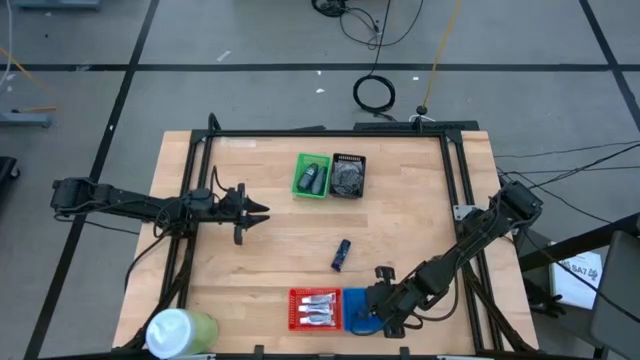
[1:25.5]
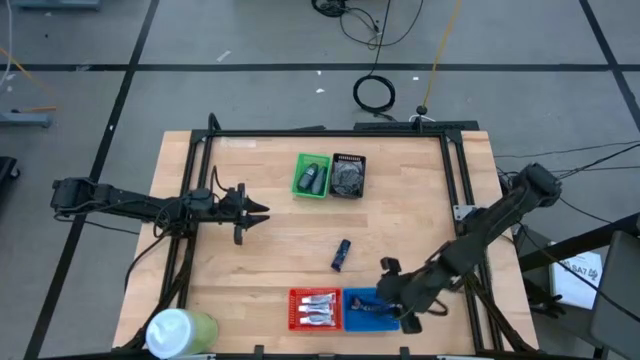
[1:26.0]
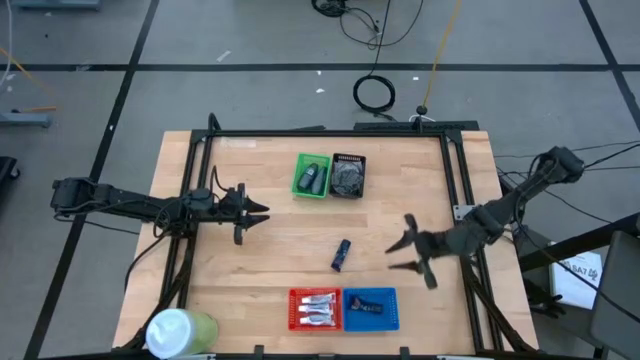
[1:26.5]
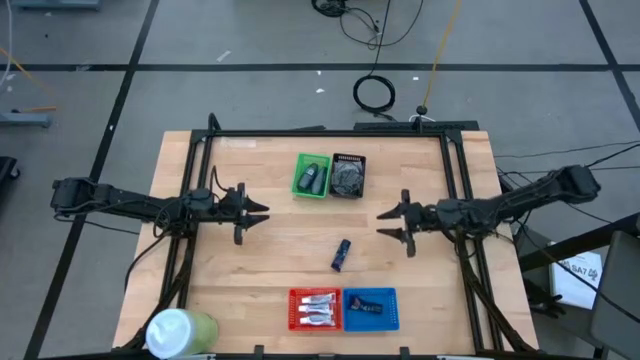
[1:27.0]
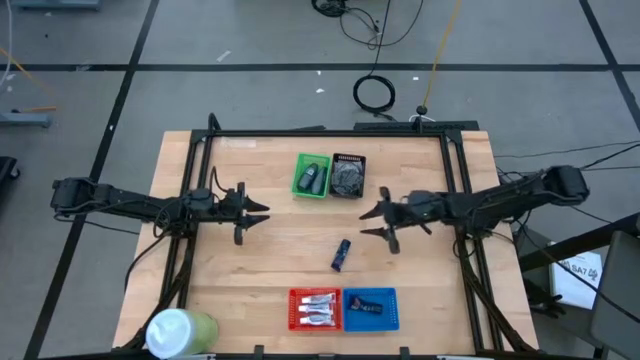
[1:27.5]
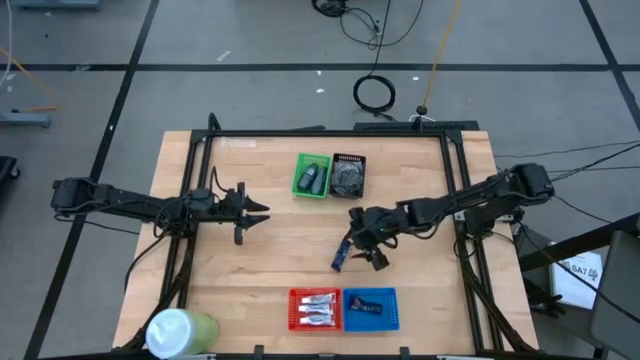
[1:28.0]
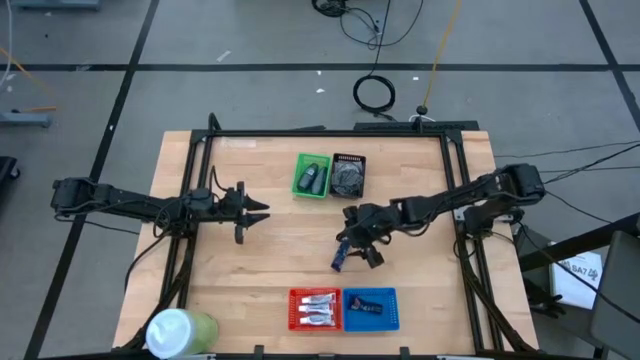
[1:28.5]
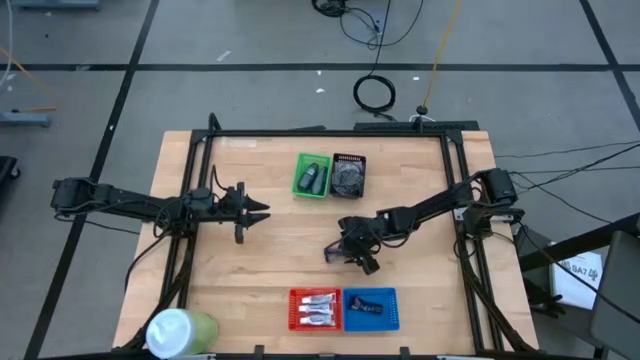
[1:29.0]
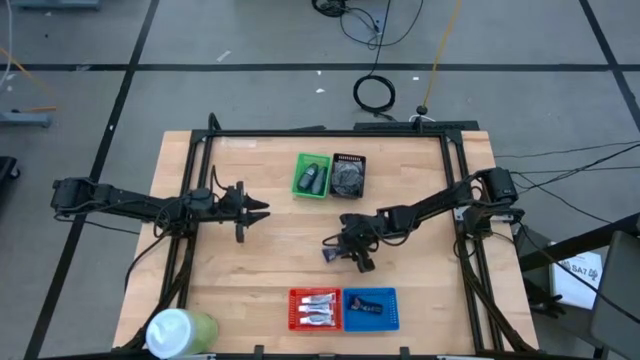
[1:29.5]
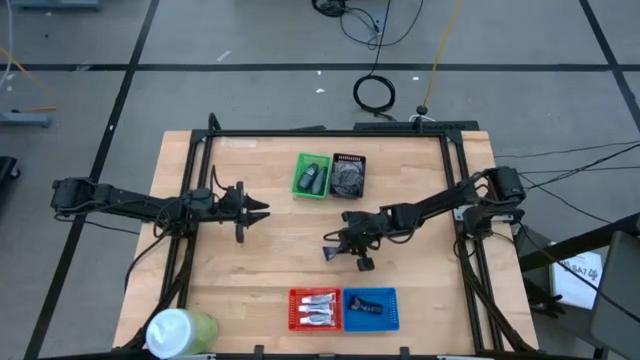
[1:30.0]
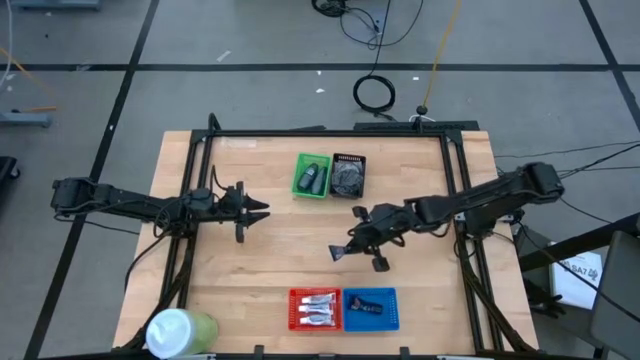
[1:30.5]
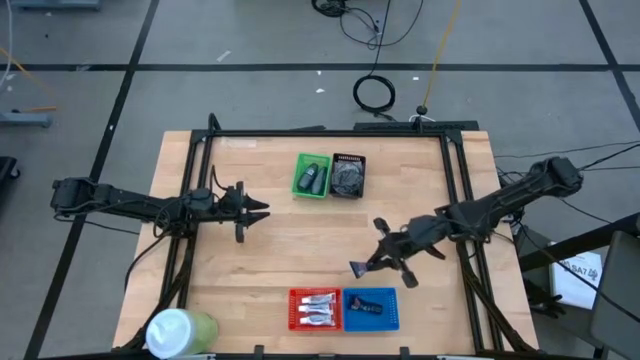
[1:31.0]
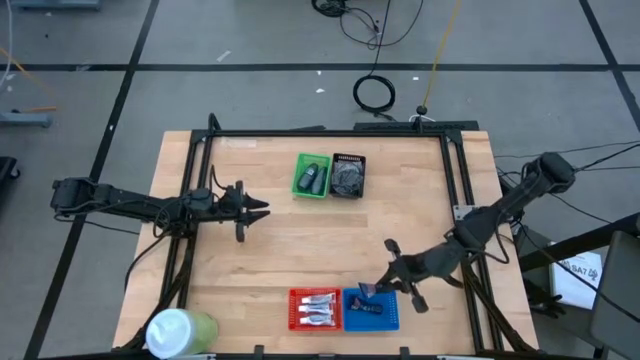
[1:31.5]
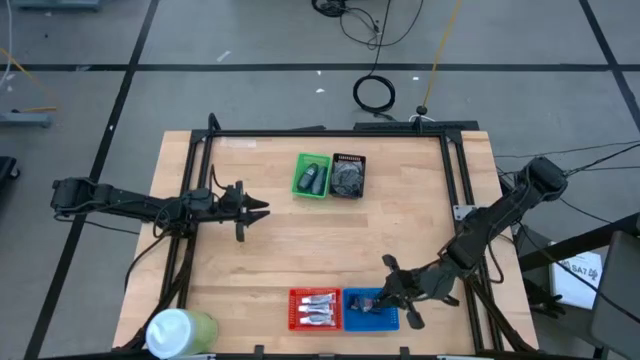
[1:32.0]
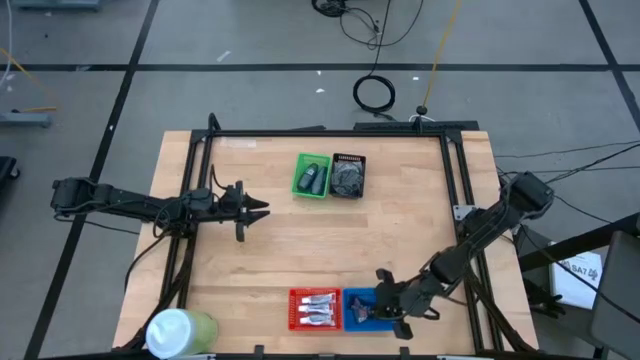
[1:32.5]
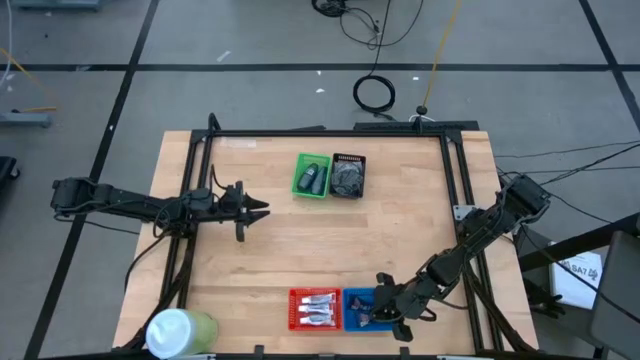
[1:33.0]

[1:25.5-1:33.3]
Task: Pick & Place Travel size toiletries
Put the shave cream into the blue bin

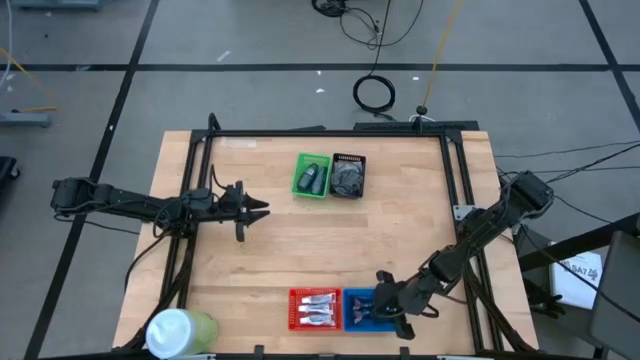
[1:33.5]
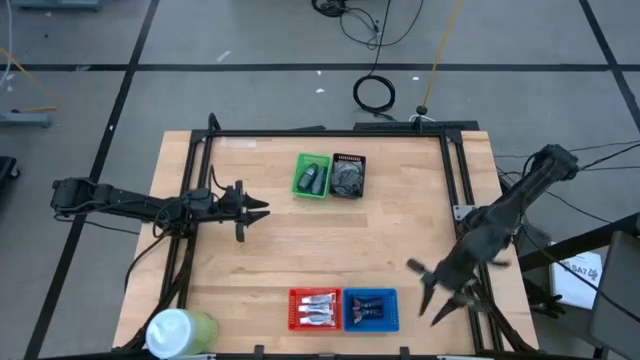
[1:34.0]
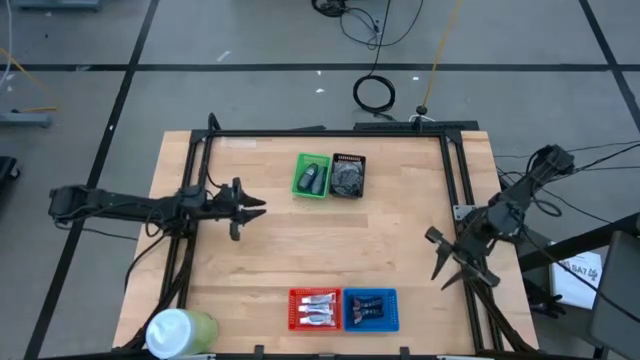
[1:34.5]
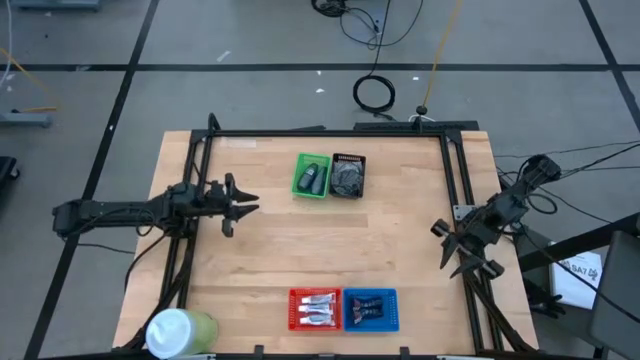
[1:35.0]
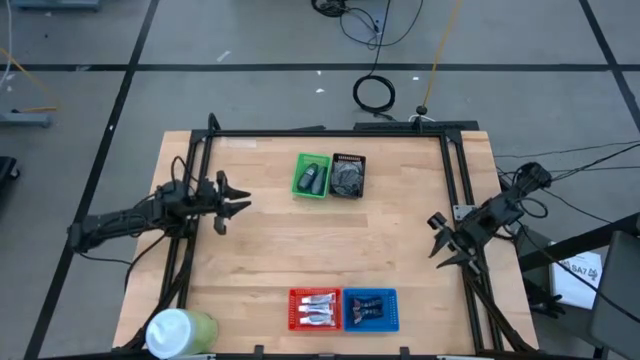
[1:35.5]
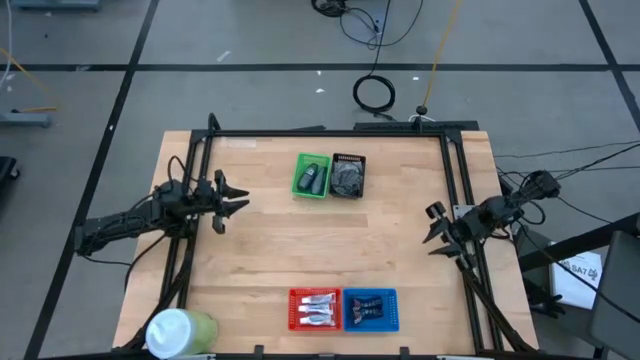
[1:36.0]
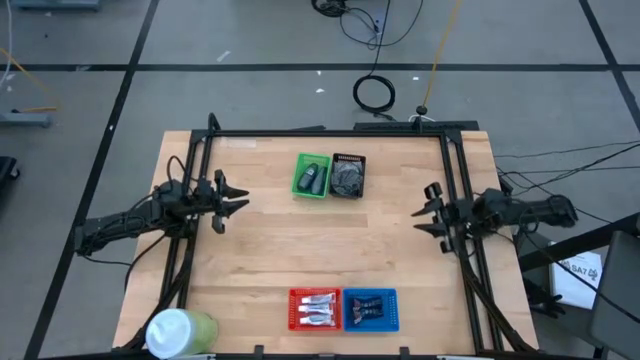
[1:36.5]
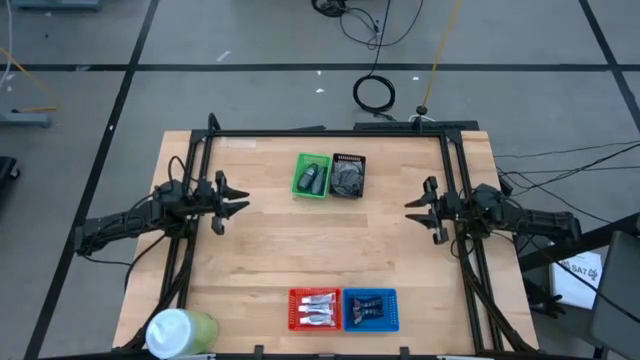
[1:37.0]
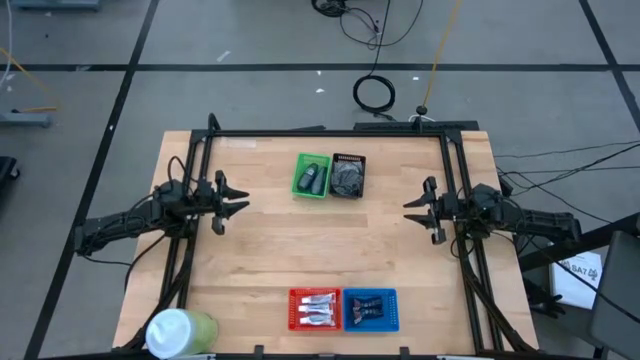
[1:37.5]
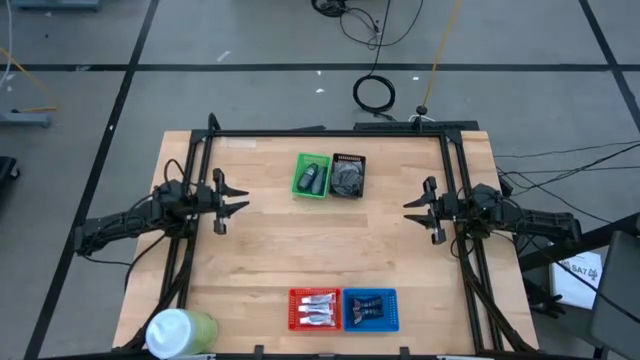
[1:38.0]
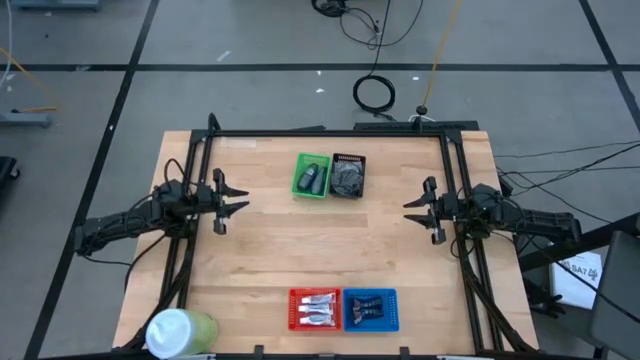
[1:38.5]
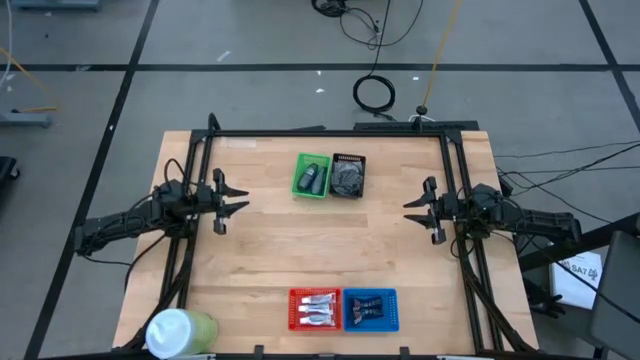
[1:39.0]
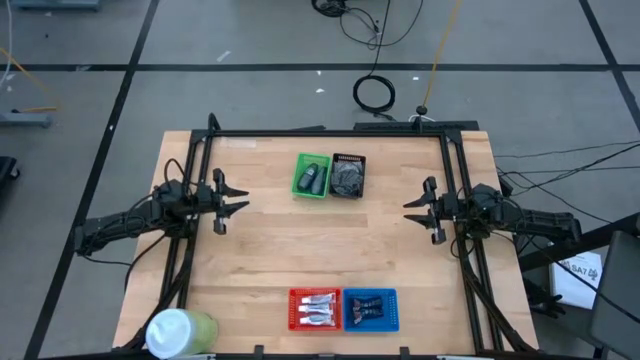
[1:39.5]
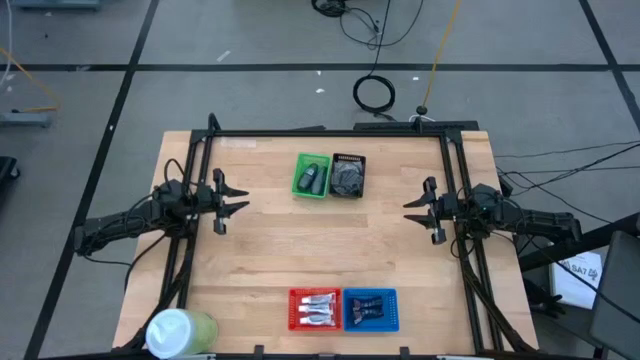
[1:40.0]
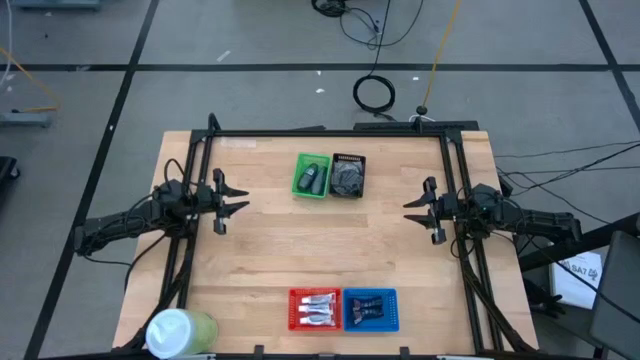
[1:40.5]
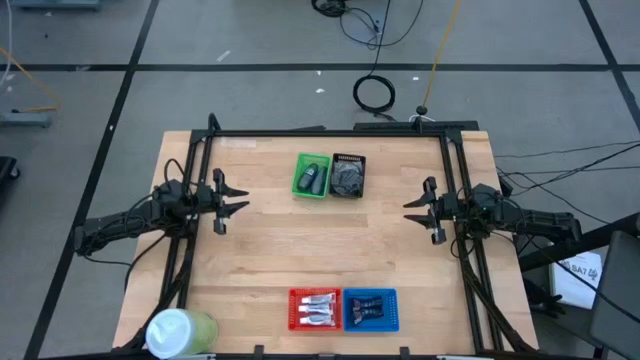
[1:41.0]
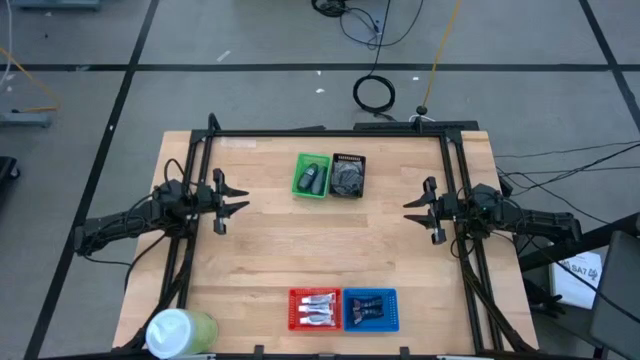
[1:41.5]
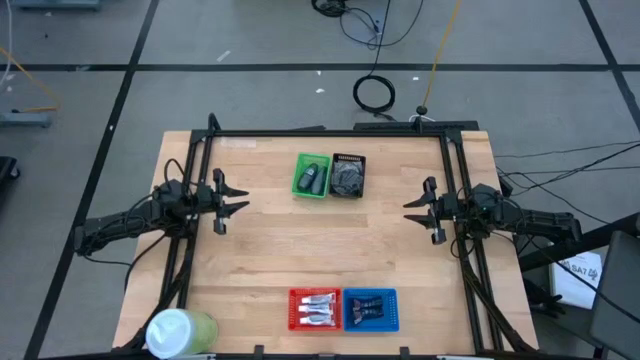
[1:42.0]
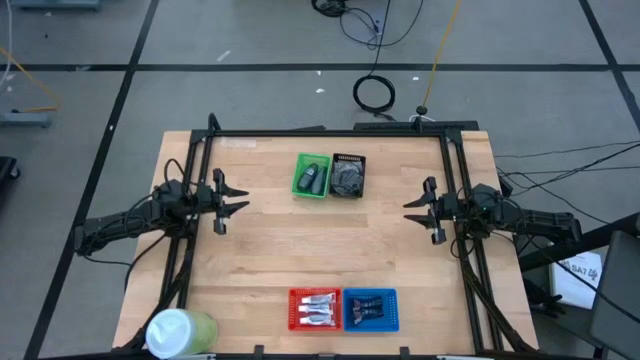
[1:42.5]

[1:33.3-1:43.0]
Return to Home Position

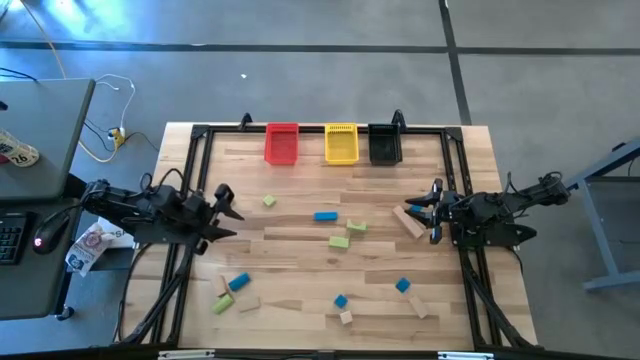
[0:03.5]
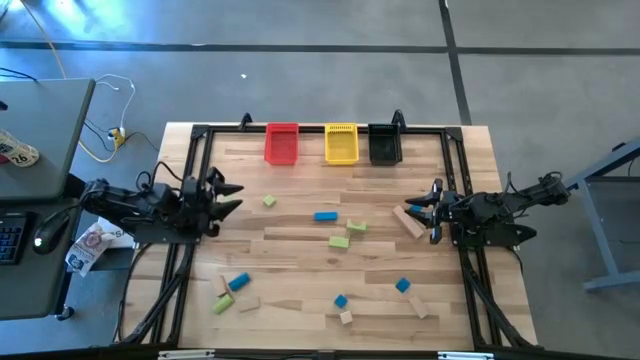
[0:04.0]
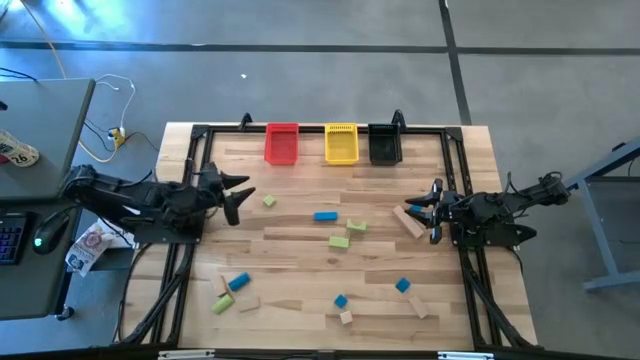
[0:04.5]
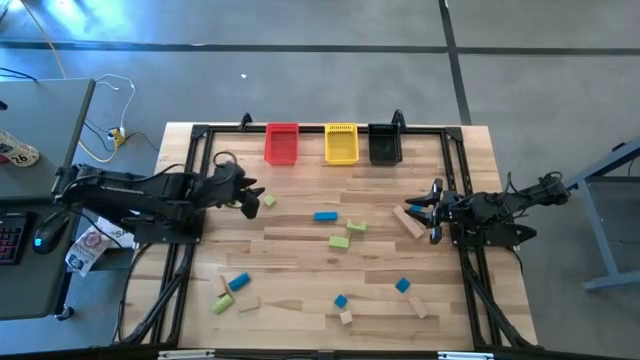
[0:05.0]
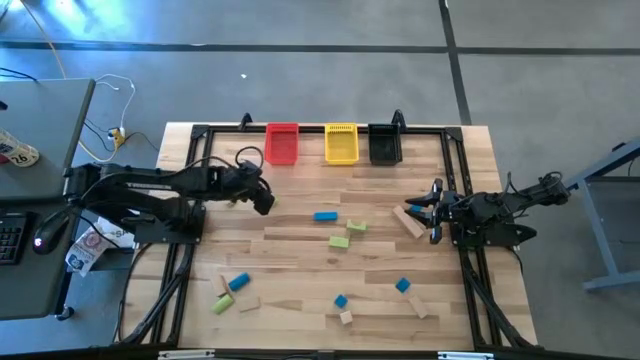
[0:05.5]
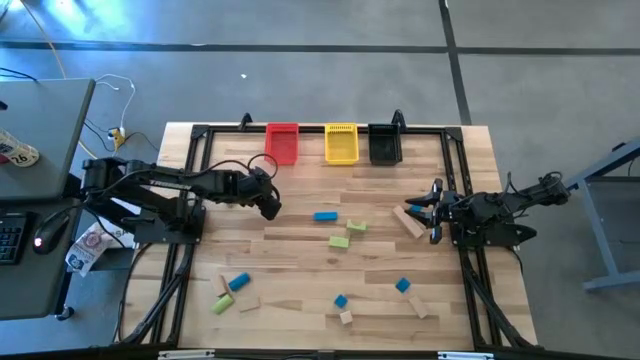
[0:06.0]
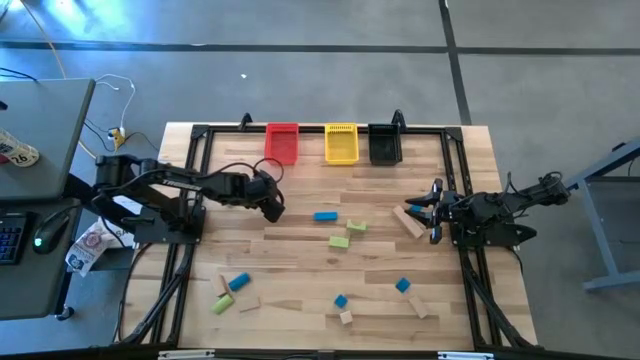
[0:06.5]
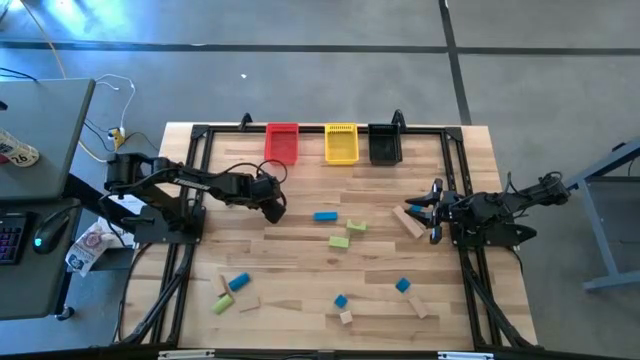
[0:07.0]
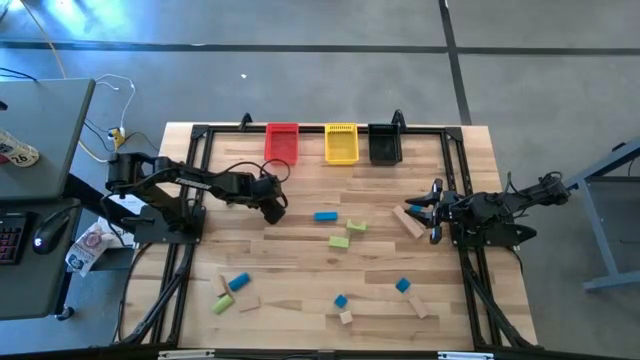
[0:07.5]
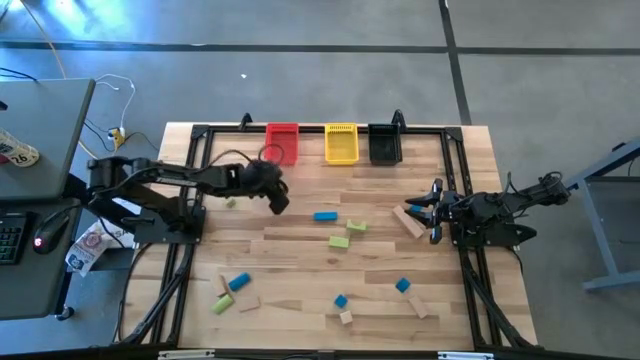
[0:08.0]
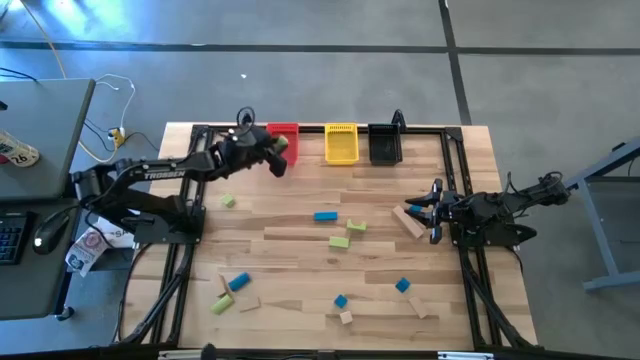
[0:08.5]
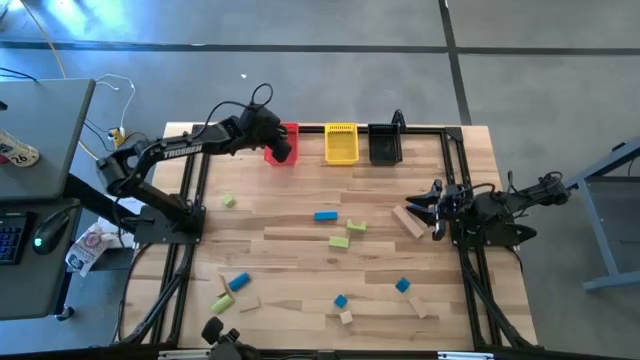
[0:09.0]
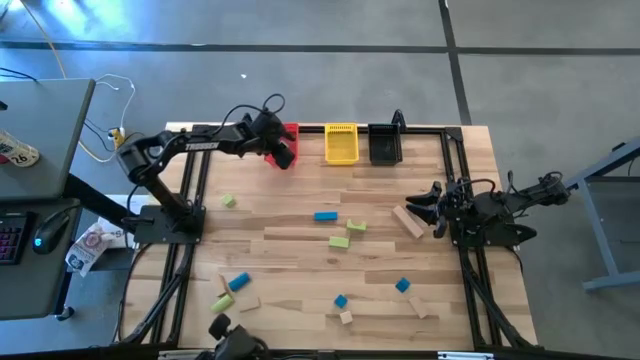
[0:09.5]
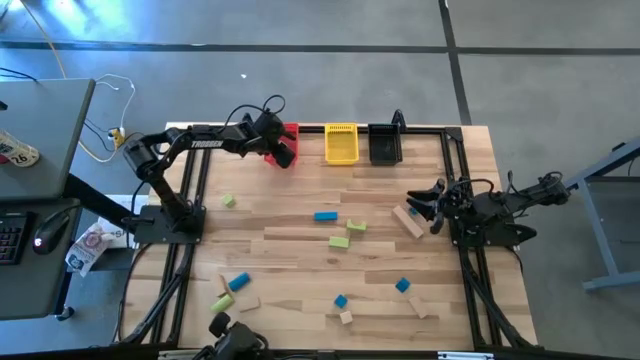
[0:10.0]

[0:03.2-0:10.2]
Task: Sort & place blocks by color
Put the green block into the red bin
